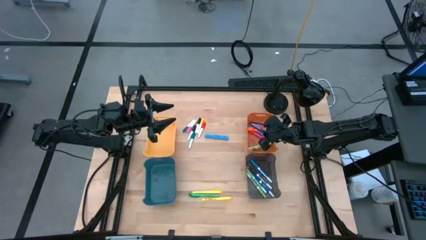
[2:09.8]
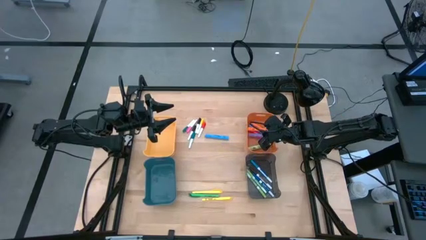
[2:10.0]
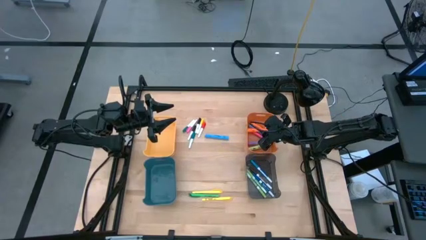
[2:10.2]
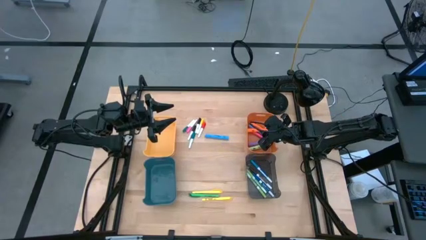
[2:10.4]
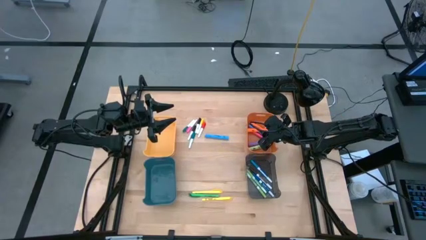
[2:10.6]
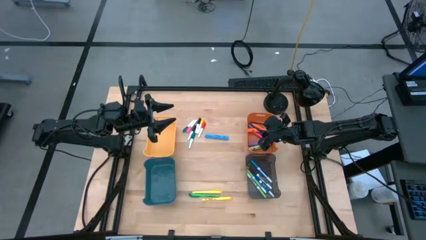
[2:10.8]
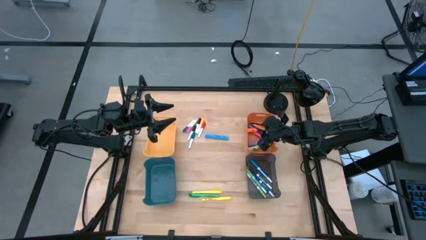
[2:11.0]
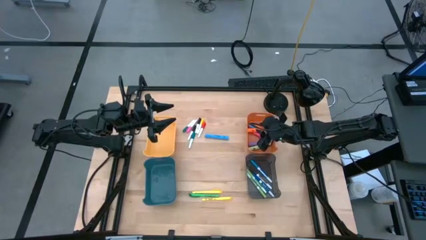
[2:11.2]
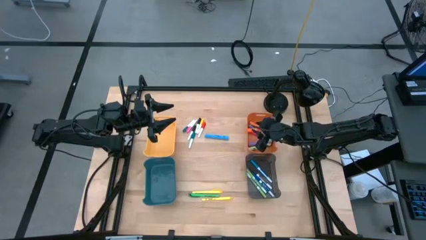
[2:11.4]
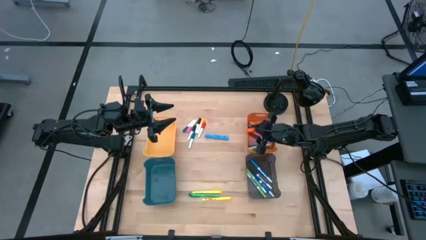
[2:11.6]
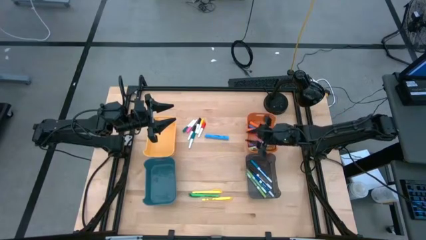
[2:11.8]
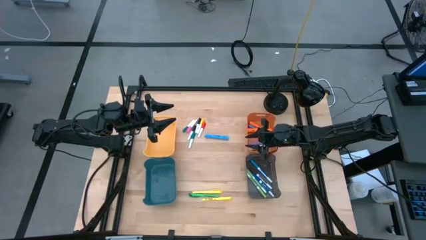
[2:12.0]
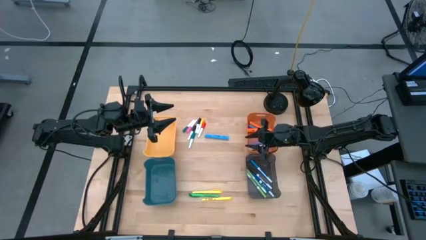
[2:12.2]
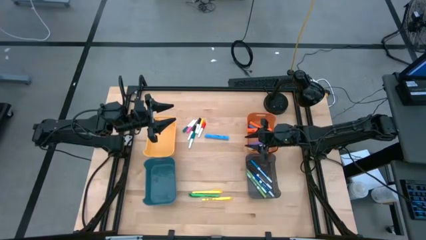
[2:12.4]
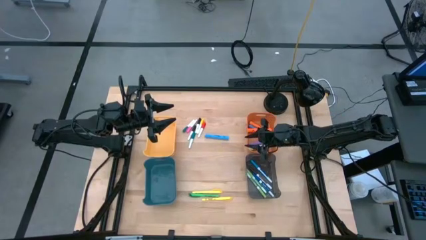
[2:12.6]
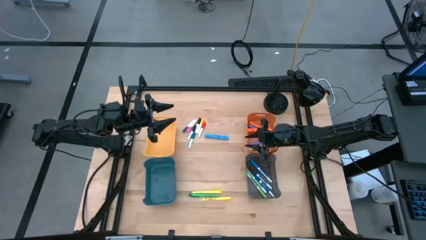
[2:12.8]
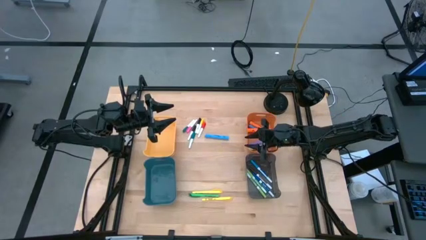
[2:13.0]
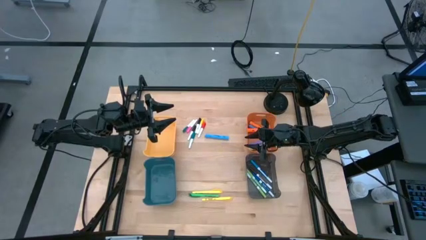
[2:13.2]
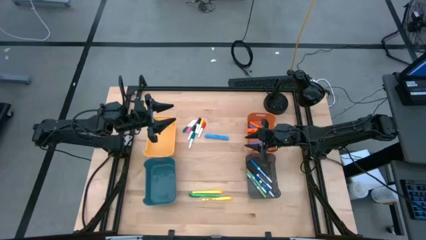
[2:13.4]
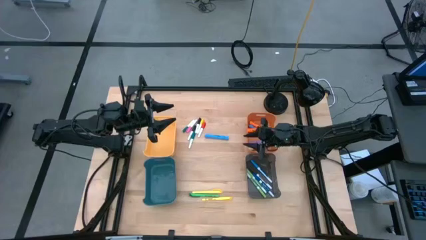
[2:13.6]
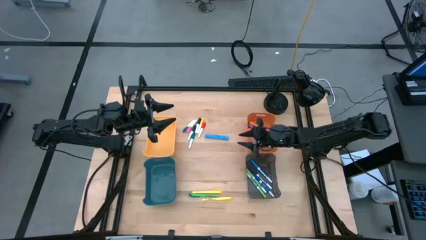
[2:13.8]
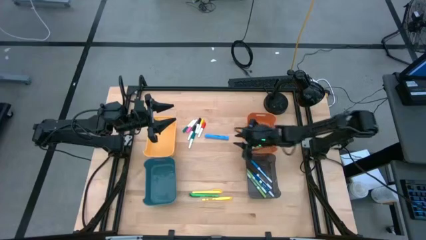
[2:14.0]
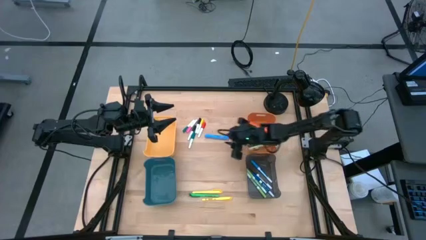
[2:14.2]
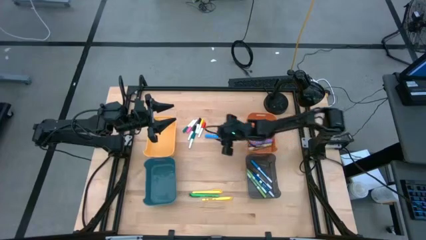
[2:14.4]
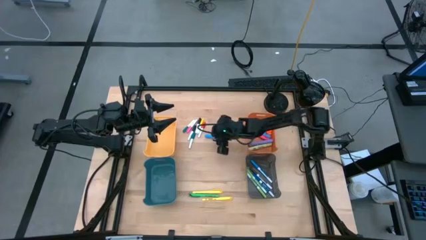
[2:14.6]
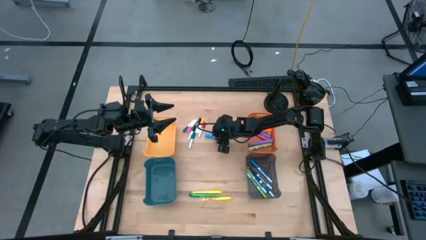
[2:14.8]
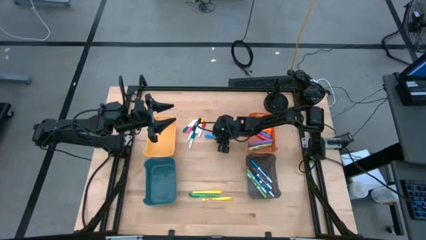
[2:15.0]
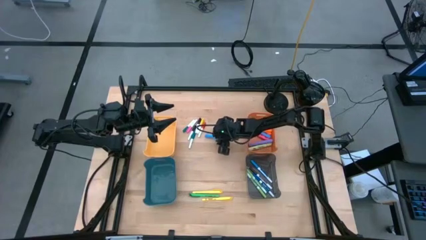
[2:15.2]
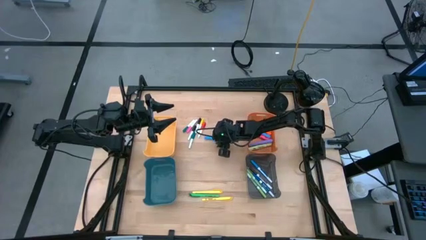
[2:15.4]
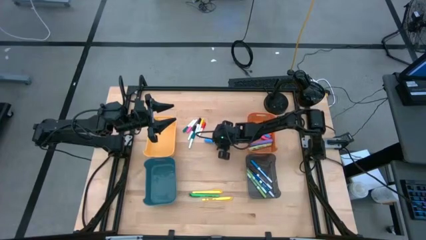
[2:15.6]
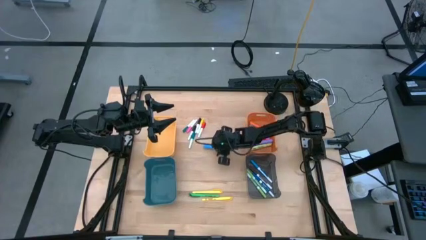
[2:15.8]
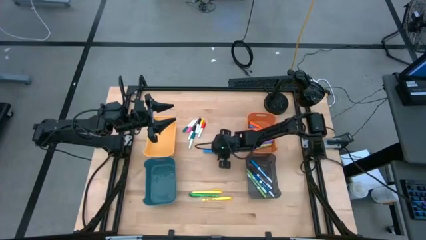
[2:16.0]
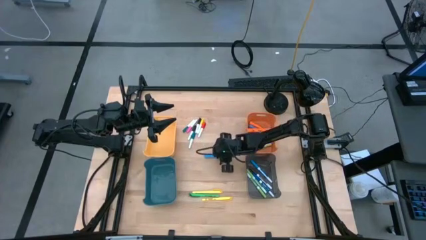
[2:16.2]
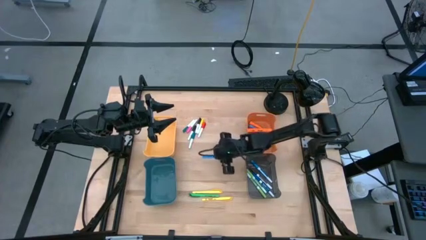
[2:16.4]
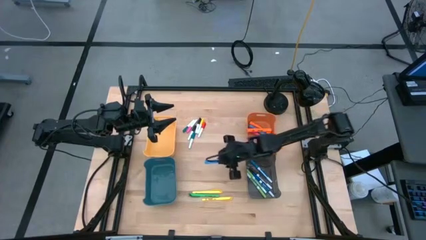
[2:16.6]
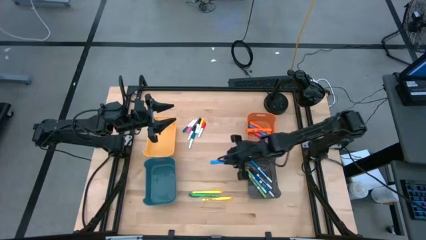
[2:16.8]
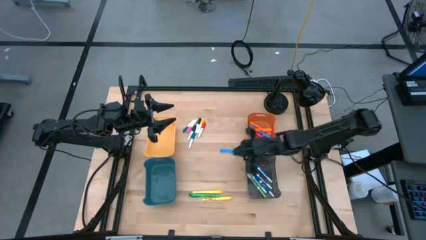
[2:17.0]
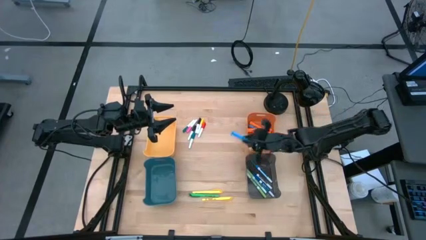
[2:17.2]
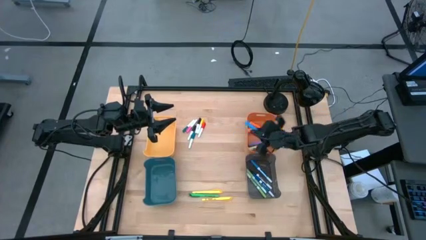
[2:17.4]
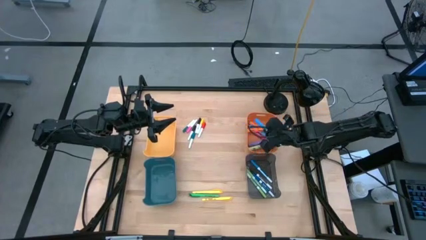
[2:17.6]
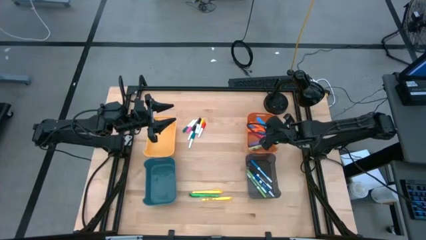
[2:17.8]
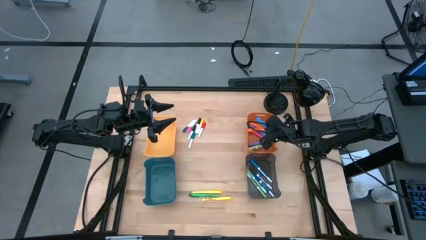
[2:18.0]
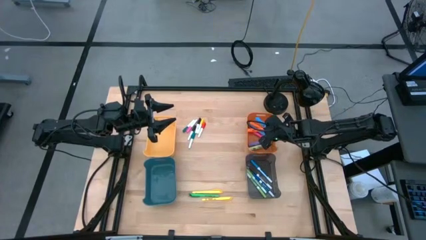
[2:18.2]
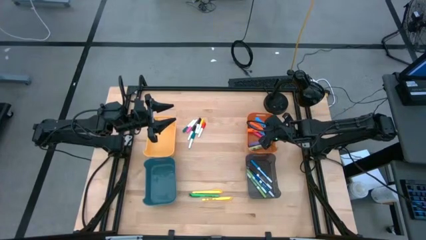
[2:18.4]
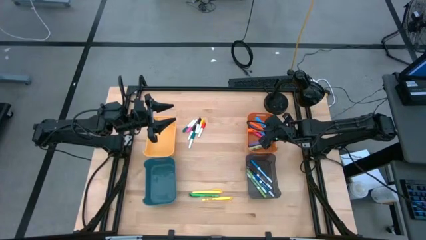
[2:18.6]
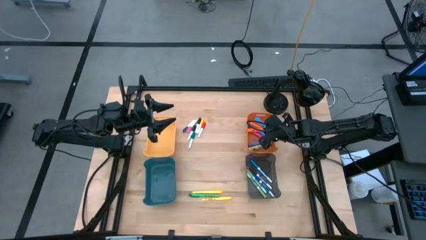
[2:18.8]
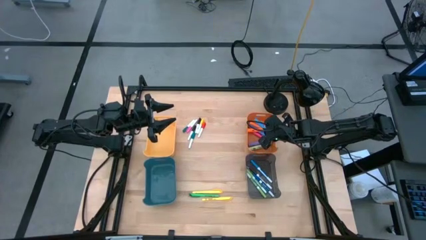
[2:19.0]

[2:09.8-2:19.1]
Task: Pick & Place Markers
Put the blue highlighter into the orange bin

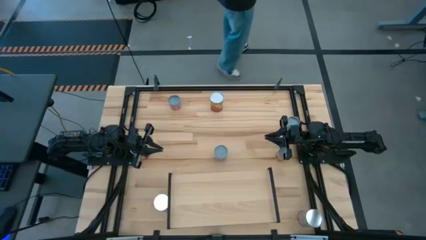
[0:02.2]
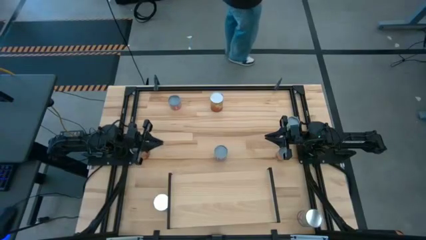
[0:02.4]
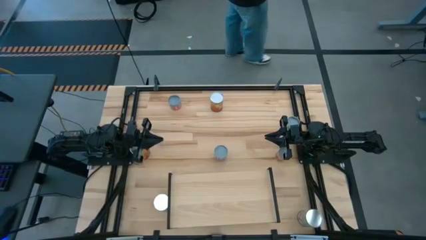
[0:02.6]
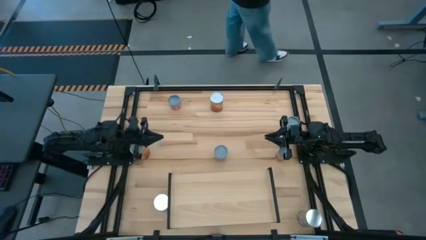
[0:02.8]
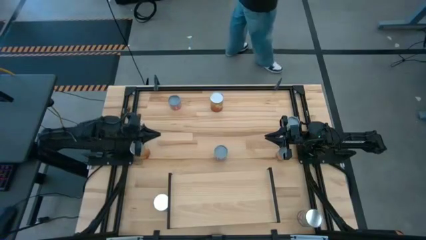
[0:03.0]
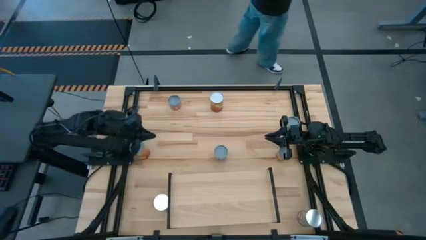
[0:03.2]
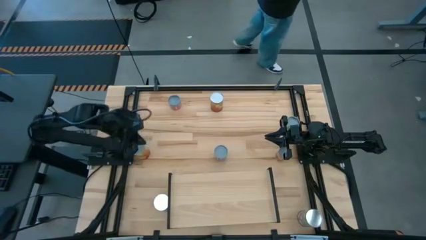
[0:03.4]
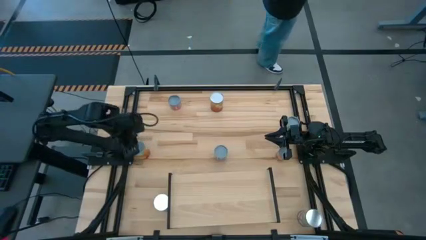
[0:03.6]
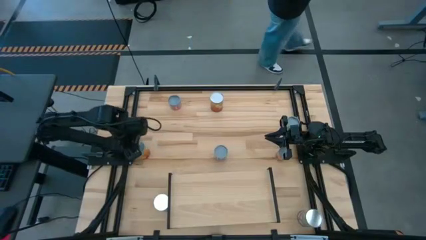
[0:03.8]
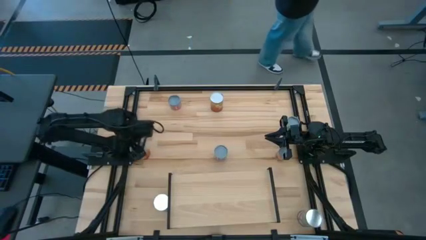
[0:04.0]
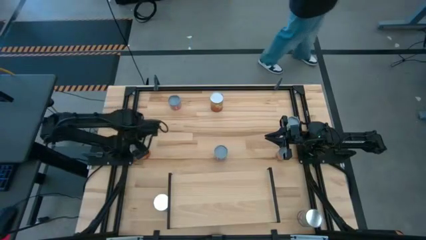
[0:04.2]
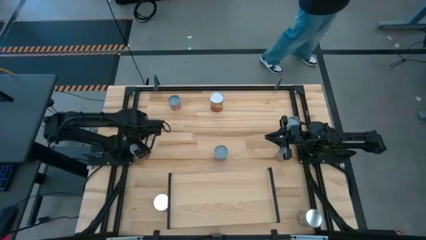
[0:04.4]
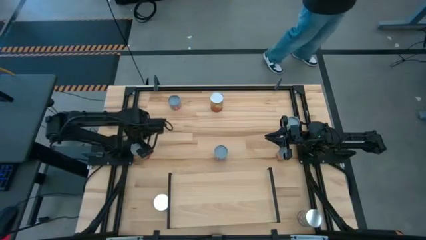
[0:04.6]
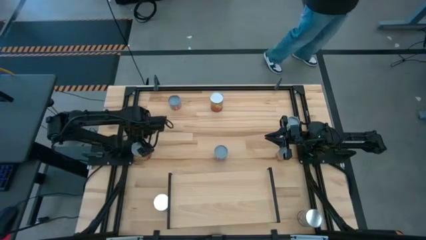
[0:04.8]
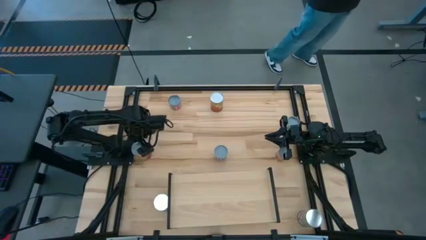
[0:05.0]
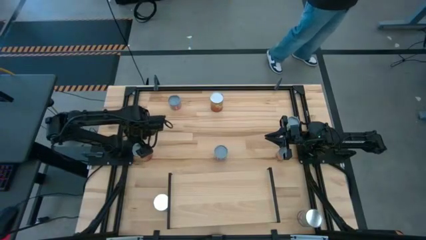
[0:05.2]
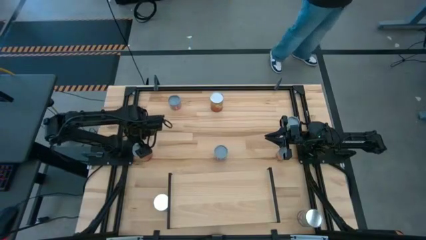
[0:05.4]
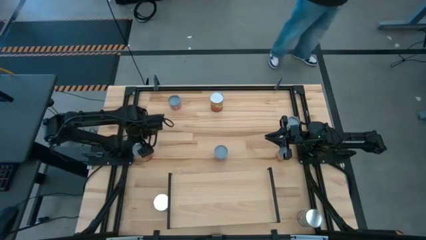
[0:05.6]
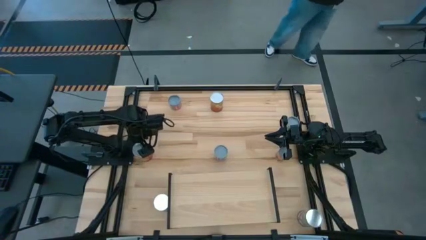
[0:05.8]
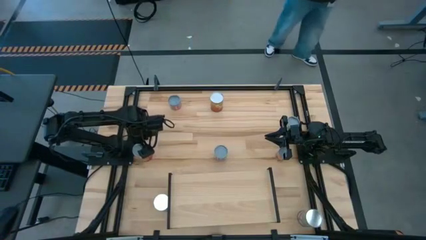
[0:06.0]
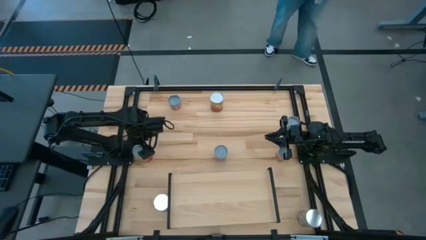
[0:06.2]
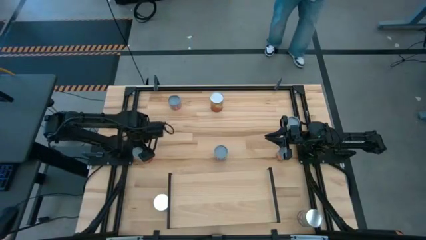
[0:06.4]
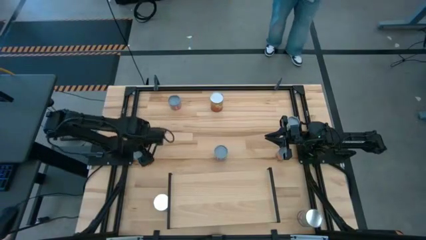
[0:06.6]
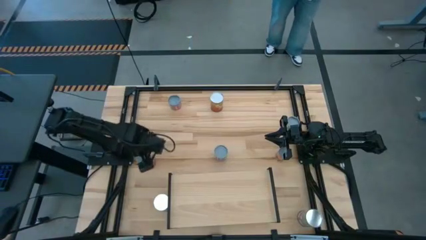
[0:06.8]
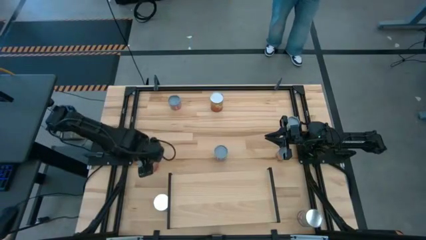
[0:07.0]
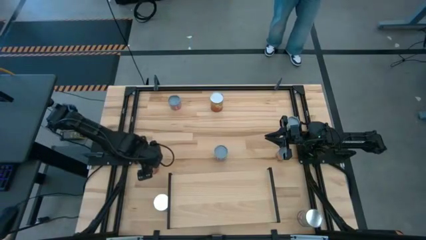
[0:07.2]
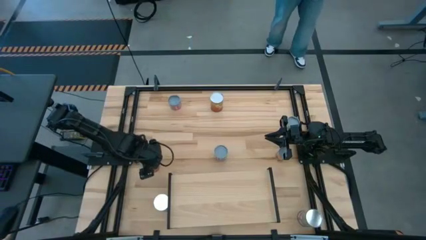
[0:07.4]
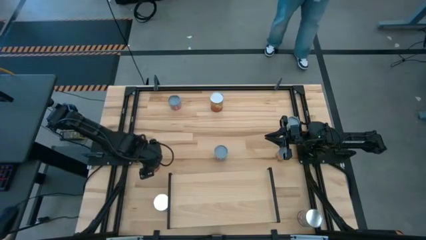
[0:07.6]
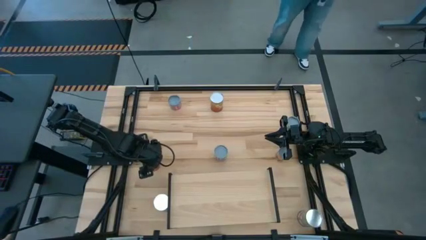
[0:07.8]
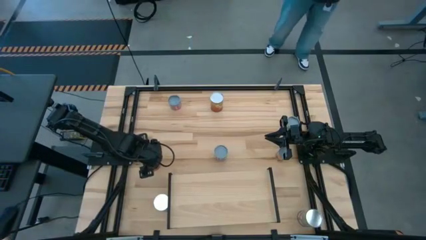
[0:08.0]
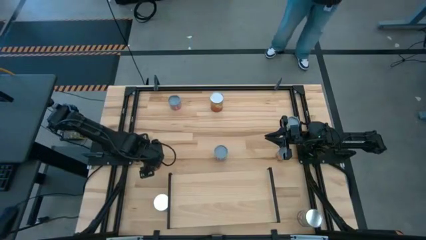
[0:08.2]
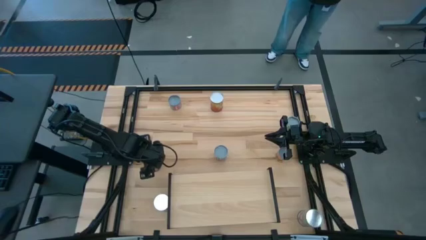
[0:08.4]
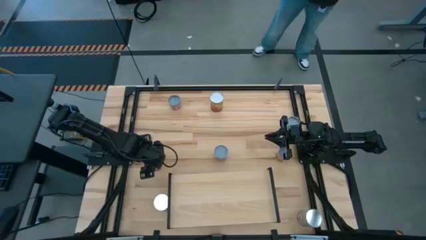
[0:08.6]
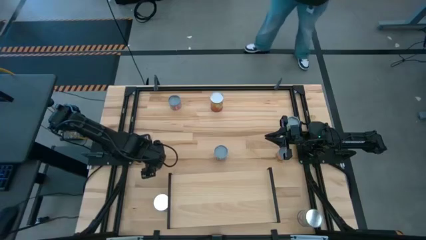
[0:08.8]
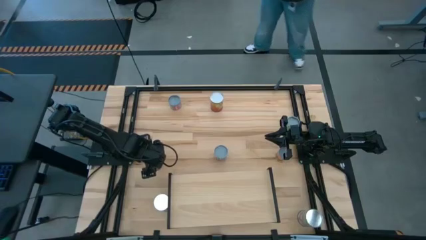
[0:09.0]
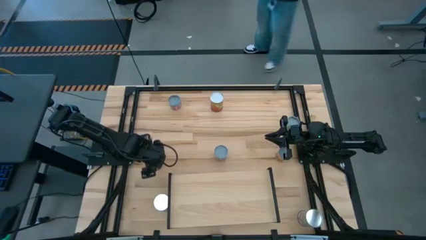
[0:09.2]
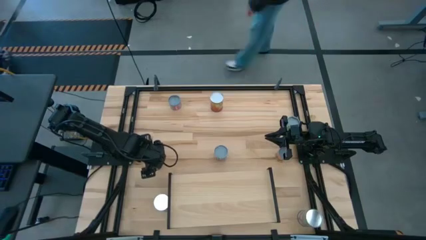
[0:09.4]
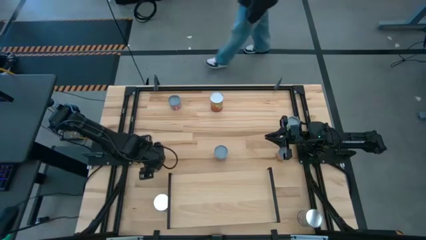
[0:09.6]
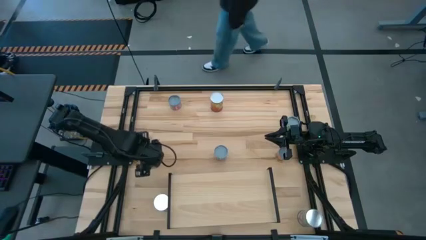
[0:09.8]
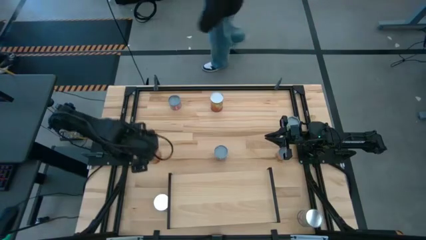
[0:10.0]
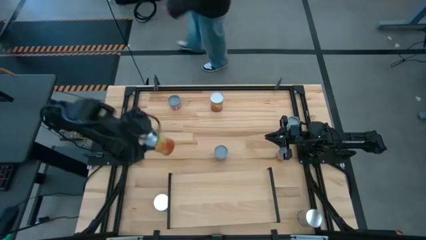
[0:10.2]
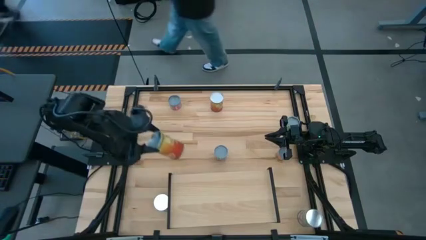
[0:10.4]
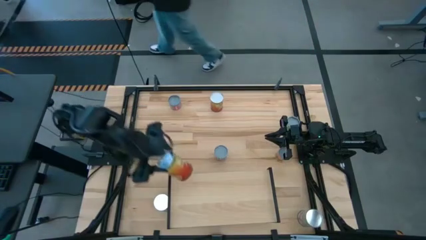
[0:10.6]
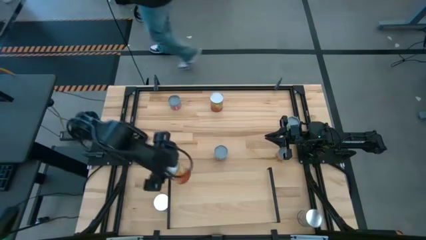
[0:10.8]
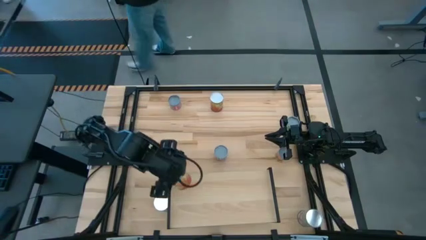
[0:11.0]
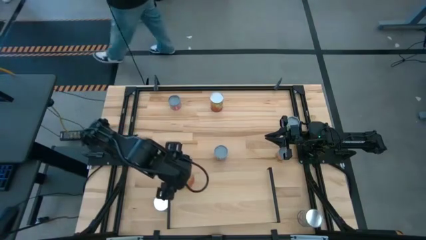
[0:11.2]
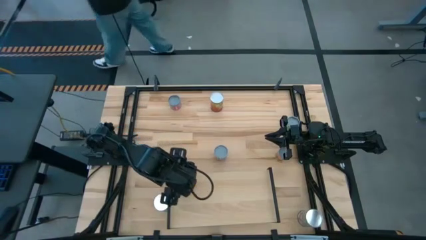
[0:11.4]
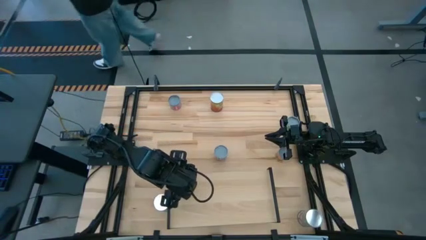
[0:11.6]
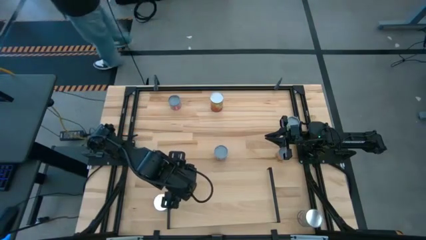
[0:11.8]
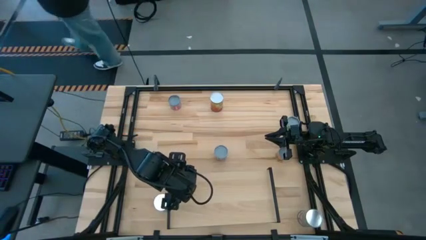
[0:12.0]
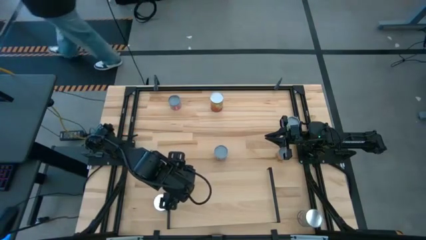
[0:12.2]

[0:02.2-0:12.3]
Task: Pick and place cans onto a shelf
Put the left canned corn on the shelf
